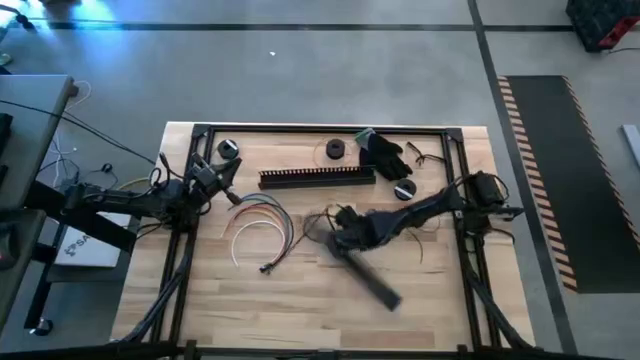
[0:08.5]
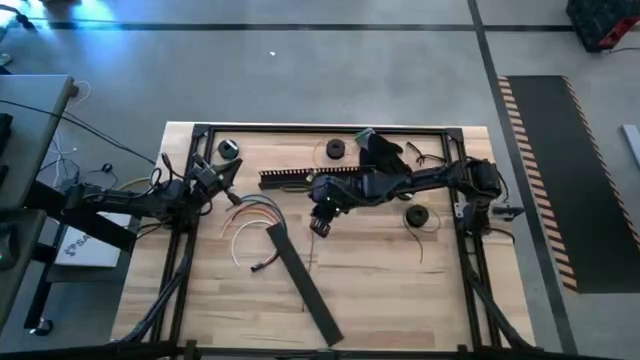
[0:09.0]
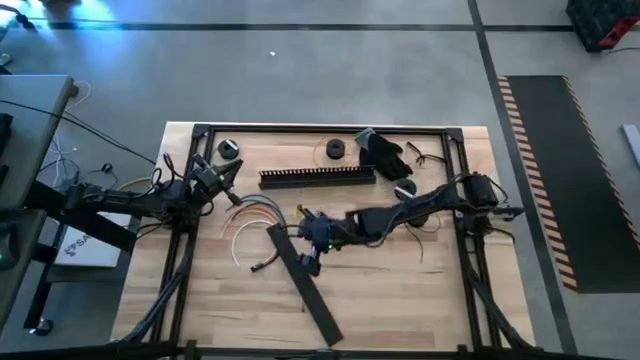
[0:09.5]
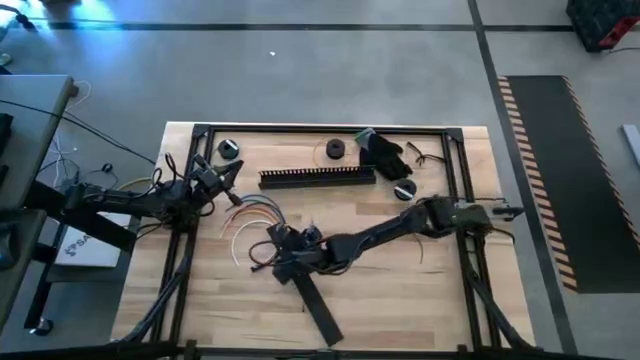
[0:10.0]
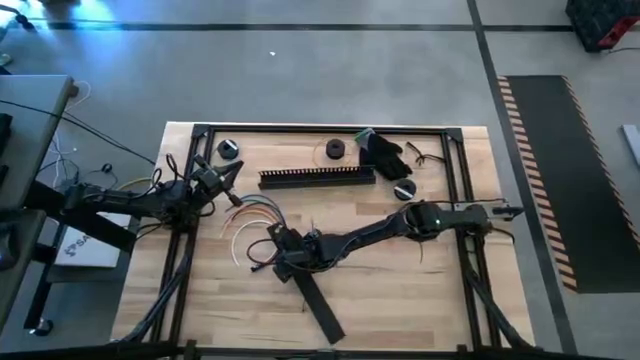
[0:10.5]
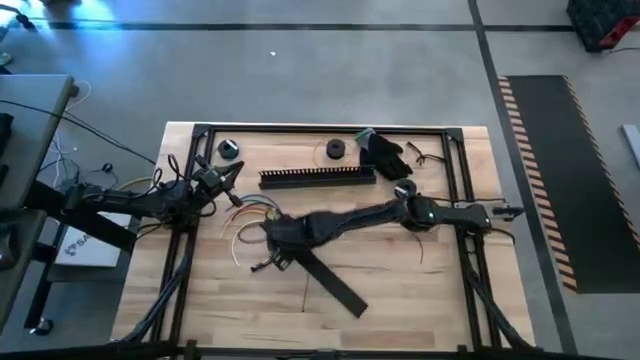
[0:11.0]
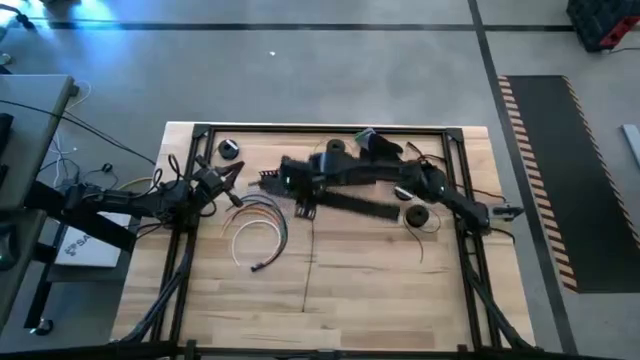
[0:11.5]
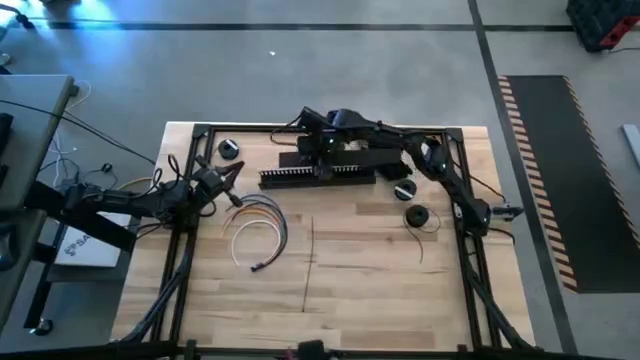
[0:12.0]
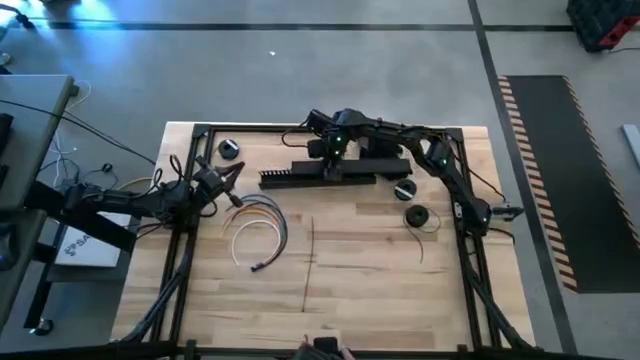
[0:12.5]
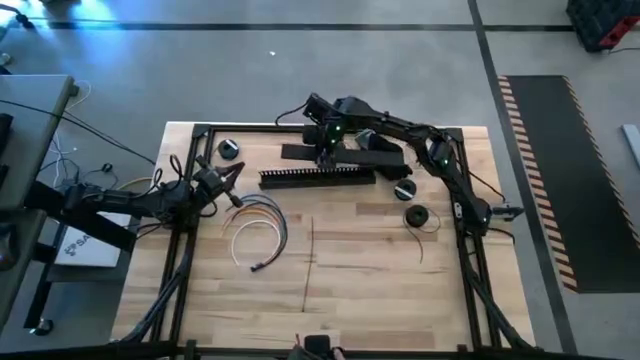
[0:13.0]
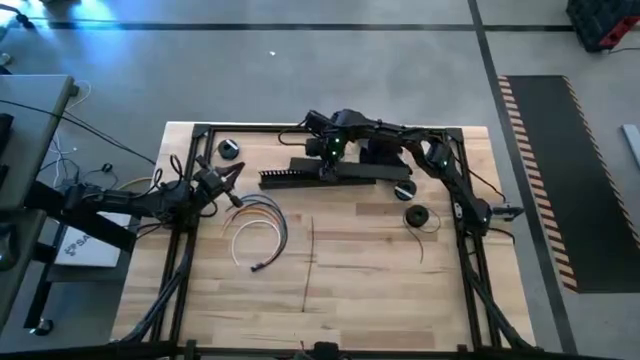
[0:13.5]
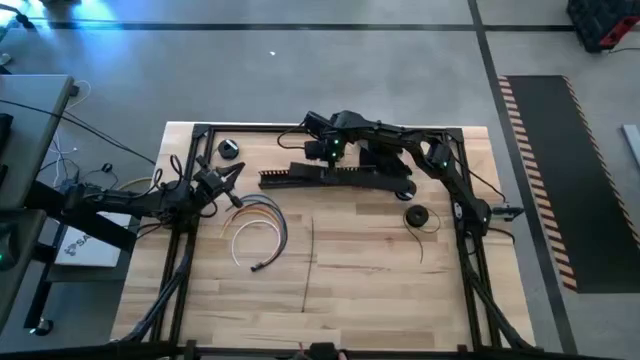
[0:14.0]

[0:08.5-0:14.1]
Task: Ziptie cables
Move the black cable duct cover to the top of the table

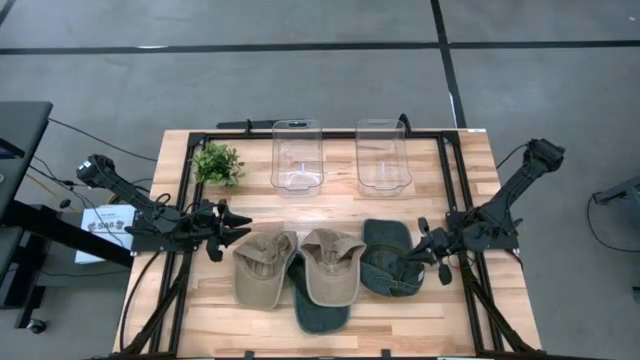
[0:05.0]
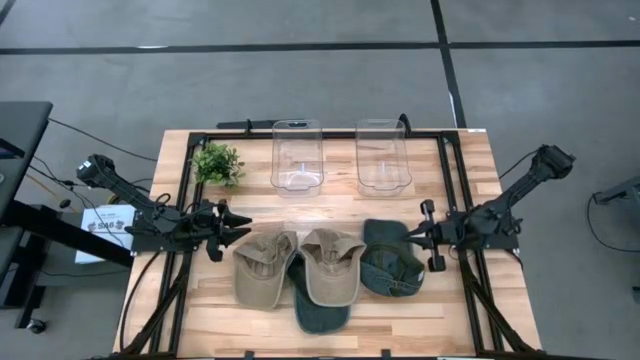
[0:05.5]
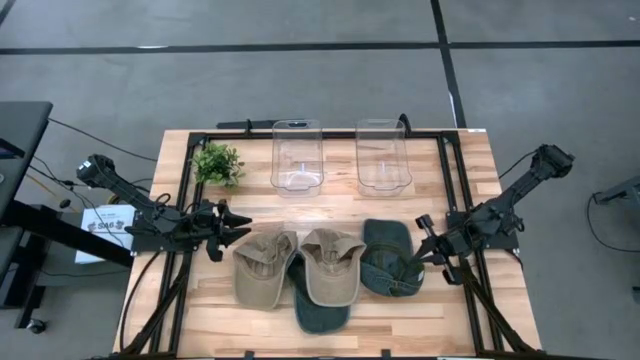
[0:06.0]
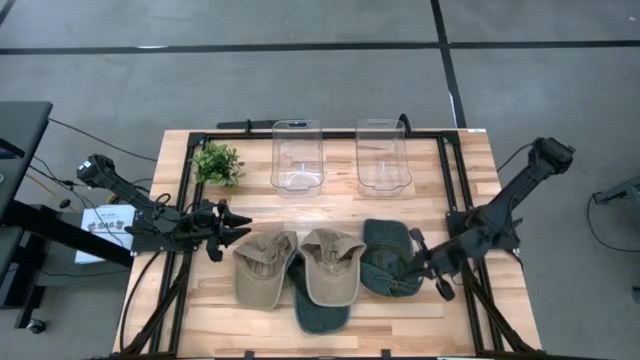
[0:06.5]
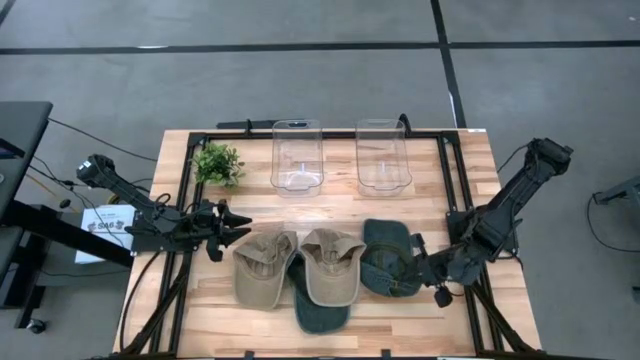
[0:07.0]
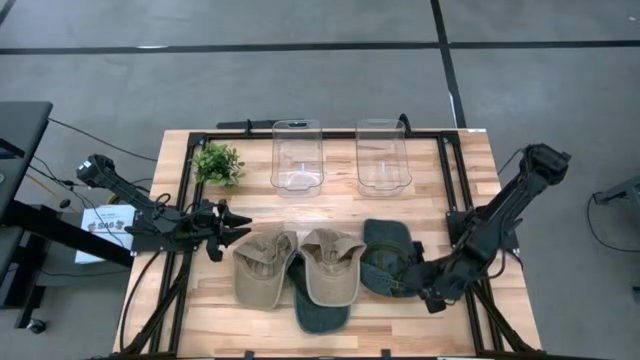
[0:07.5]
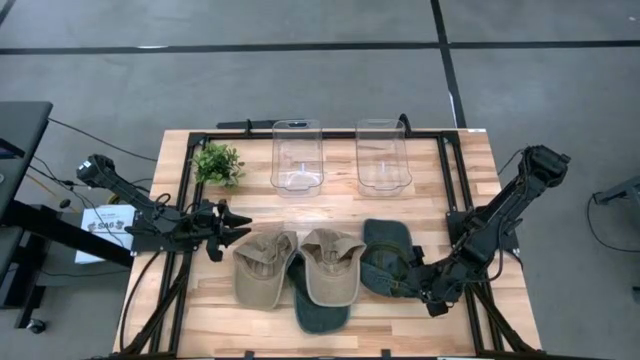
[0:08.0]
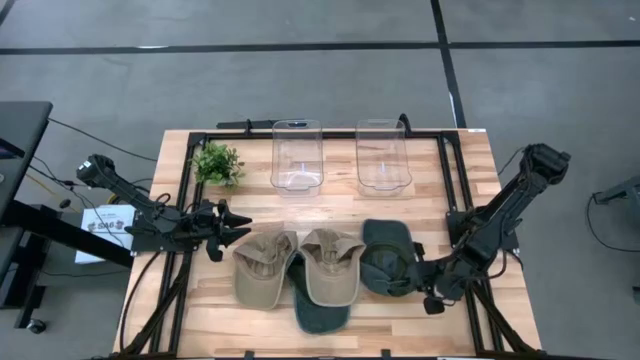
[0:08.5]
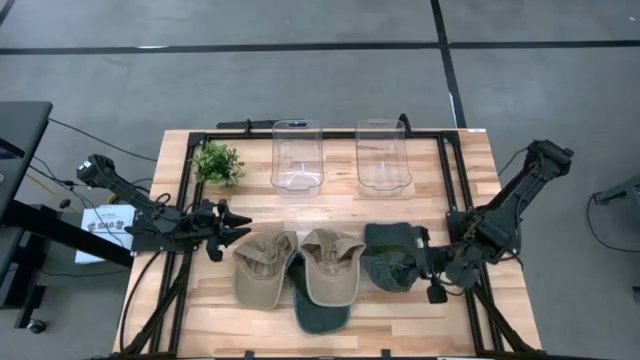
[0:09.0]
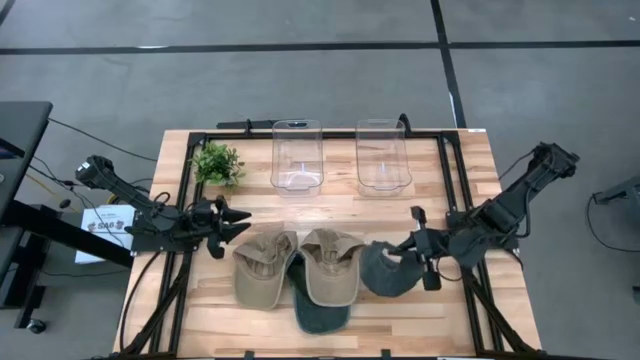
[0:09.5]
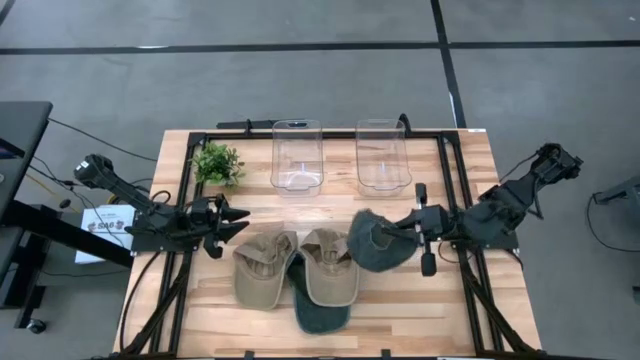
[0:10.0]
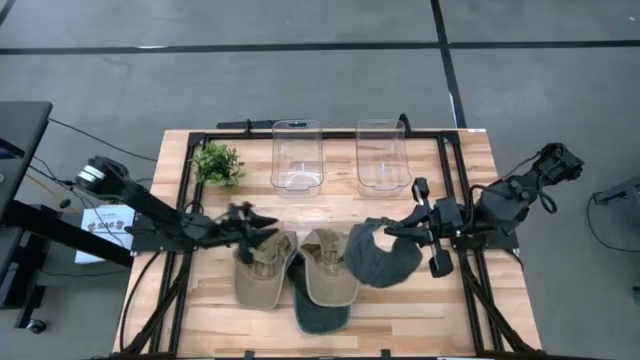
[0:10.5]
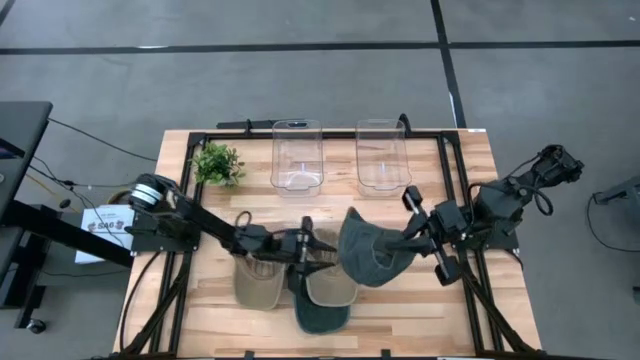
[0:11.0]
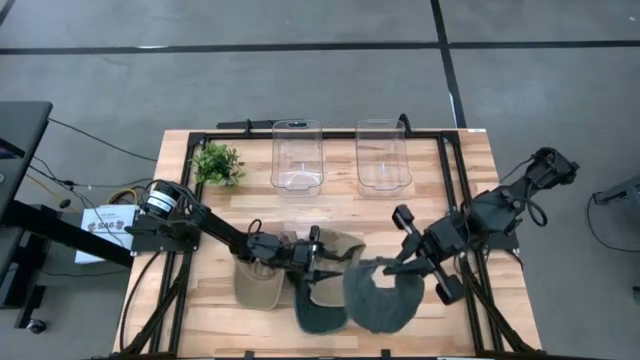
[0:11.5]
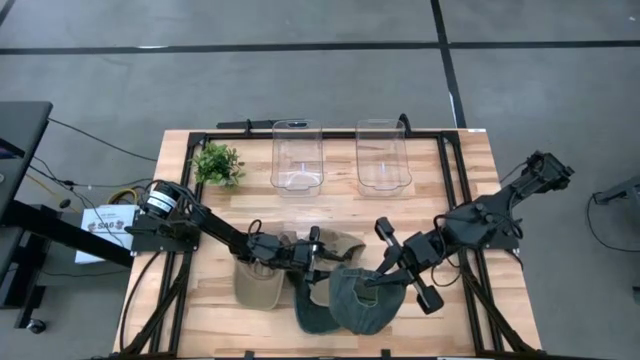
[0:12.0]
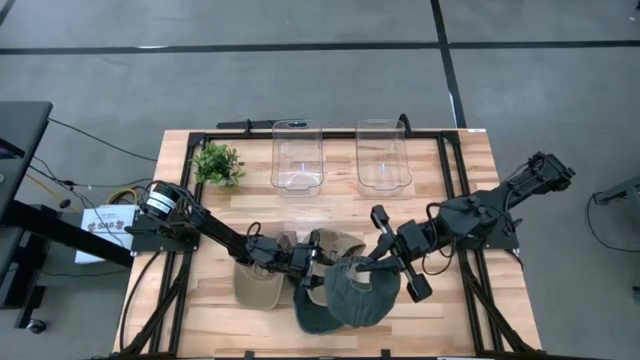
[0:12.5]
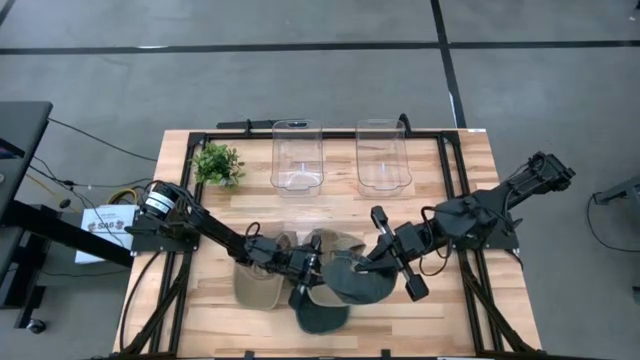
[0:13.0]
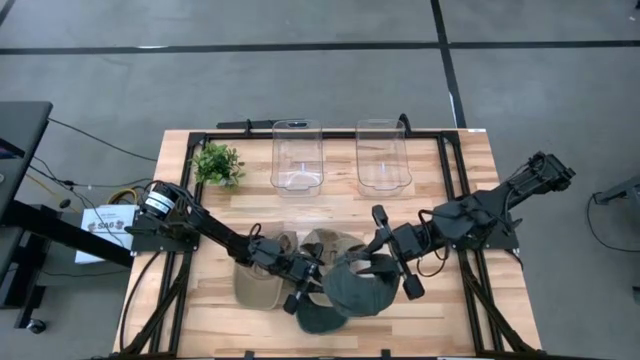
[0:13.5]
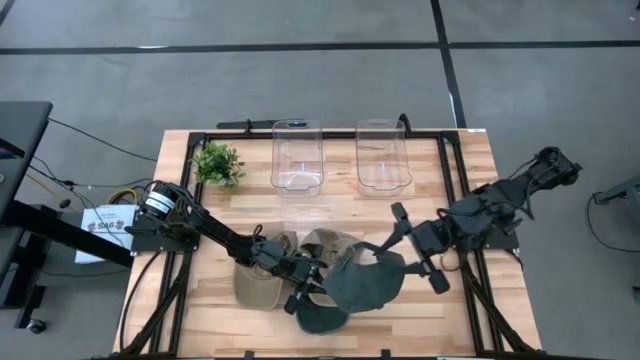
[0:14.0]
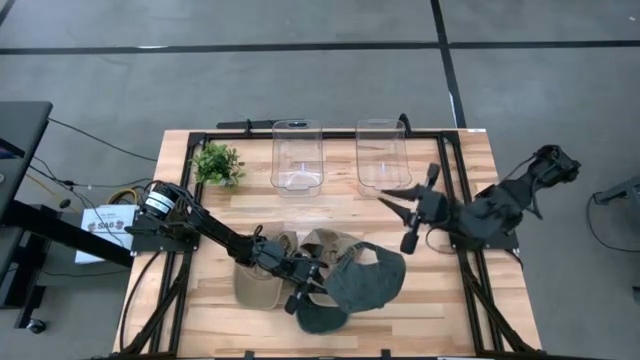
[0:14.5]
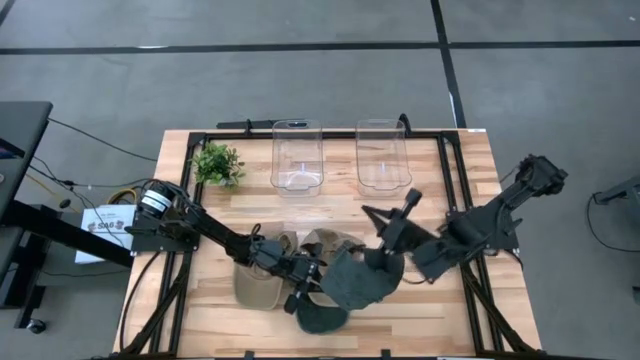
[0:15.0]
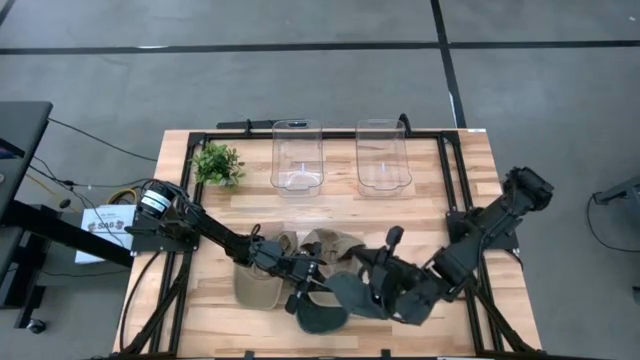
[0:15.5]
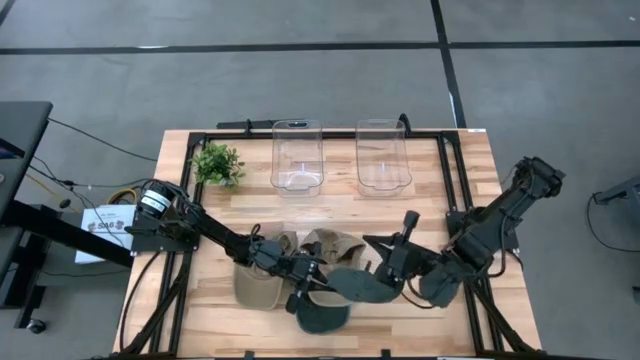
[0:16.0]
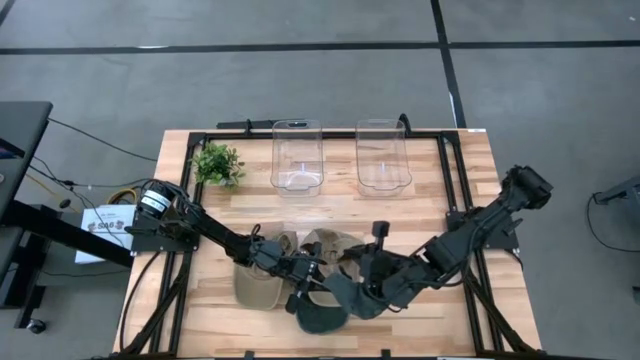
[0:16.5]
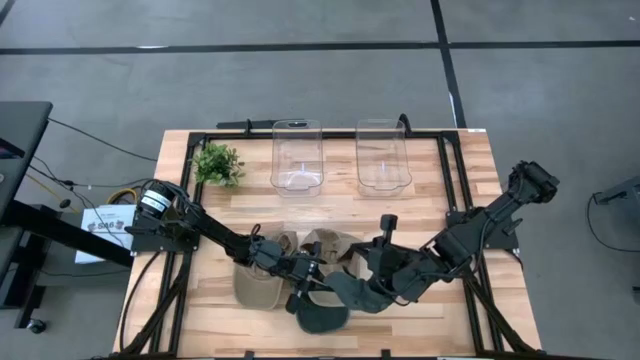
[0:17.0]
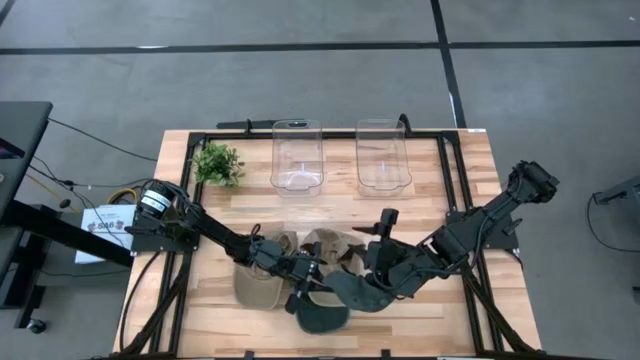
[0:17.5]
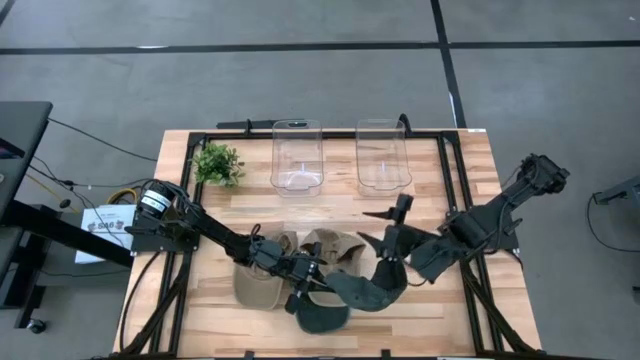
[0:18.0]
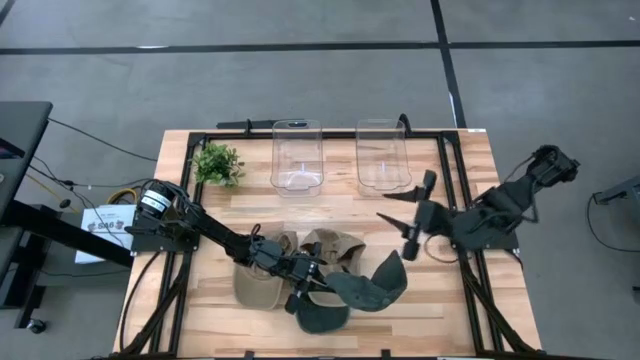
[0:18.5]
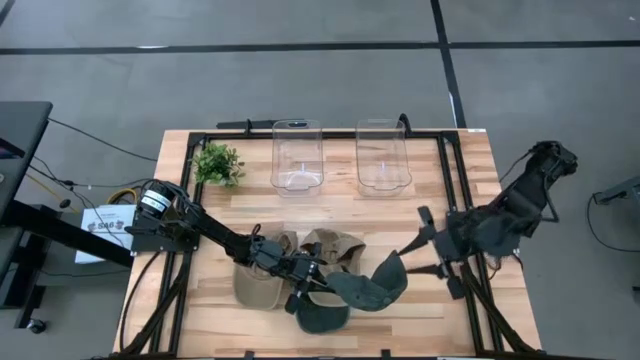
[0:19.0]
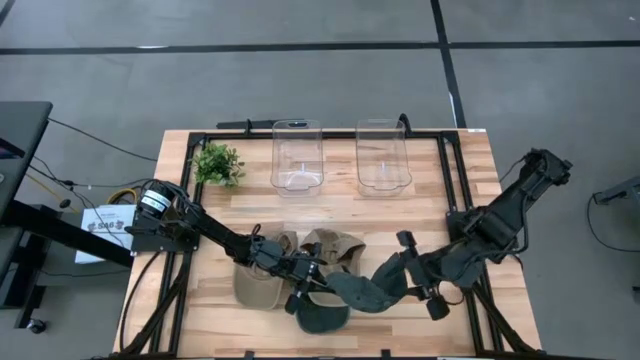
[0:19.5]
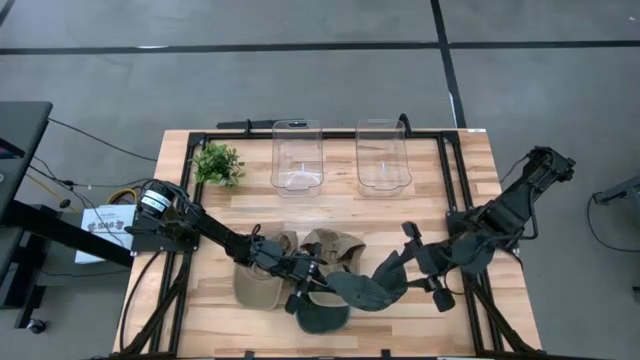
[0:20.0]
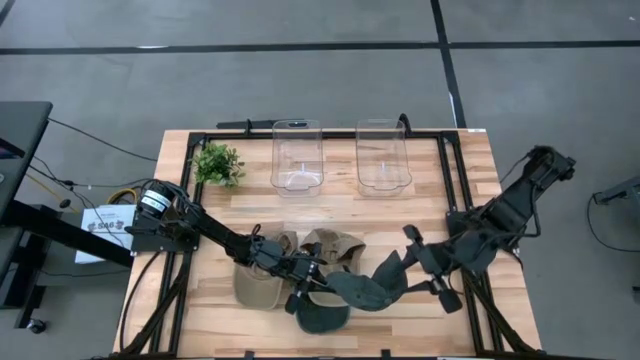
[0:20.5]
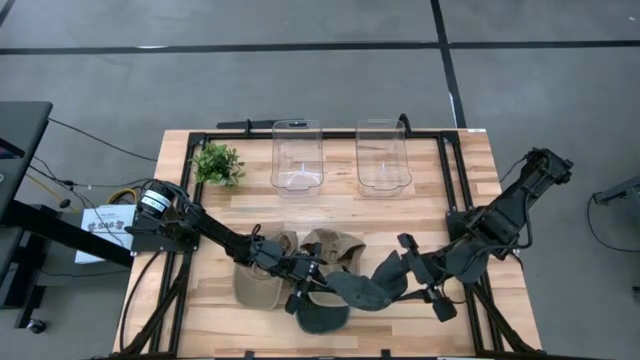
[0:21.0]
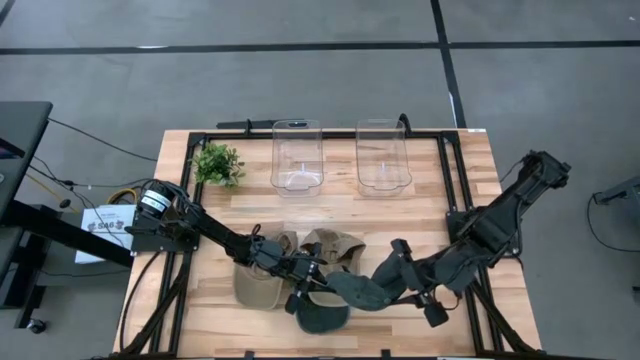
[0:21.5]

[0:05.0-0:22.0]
Task: Pick & Place hat
Put the right black cap into the right transparent bin
